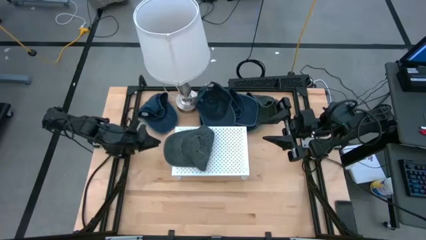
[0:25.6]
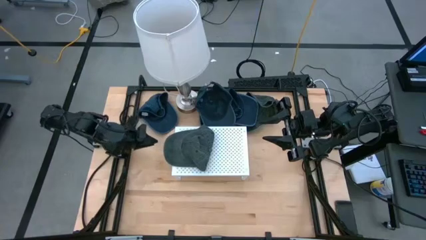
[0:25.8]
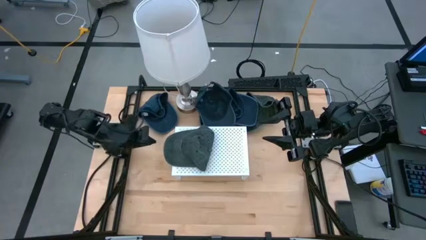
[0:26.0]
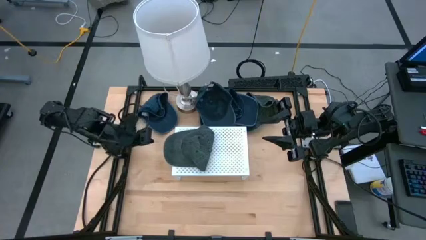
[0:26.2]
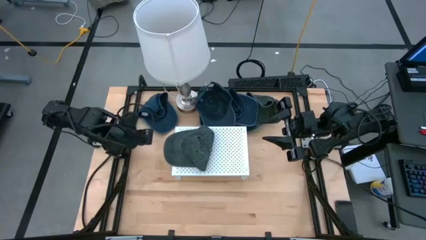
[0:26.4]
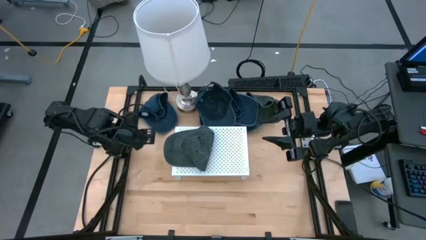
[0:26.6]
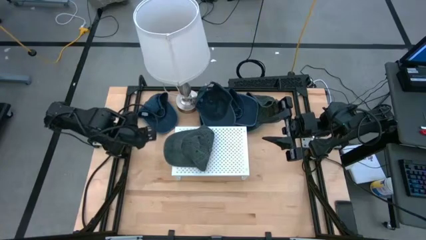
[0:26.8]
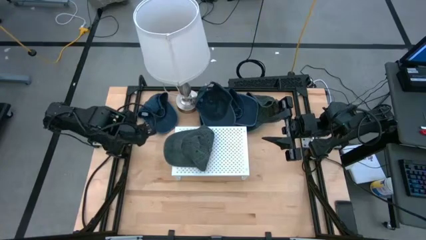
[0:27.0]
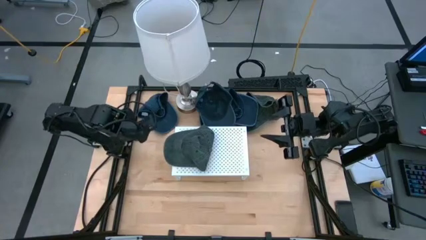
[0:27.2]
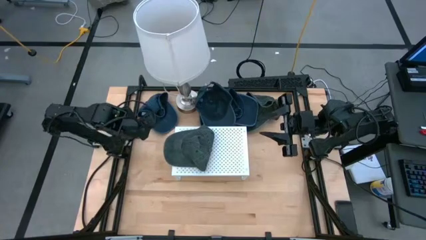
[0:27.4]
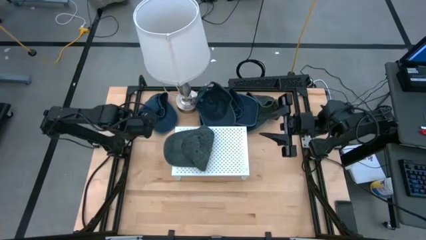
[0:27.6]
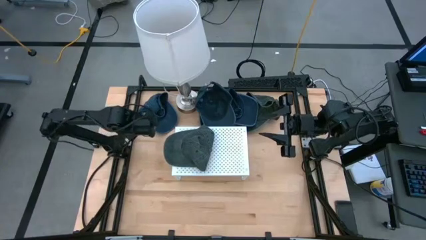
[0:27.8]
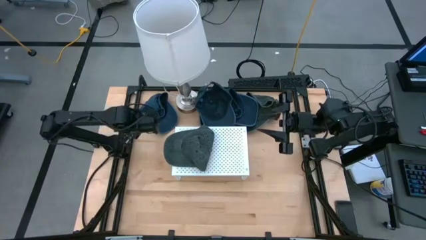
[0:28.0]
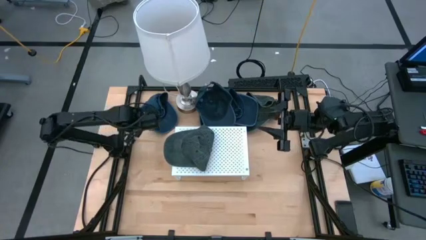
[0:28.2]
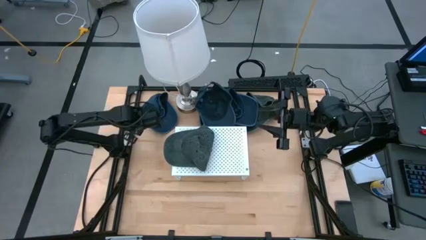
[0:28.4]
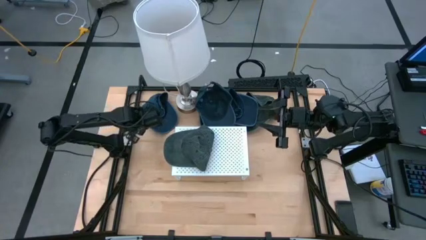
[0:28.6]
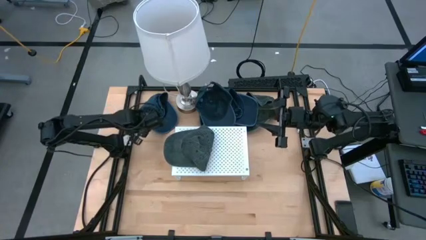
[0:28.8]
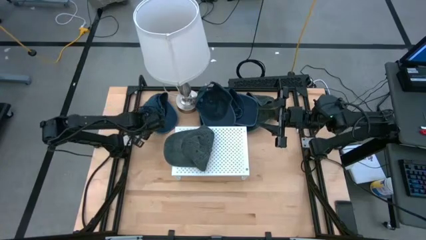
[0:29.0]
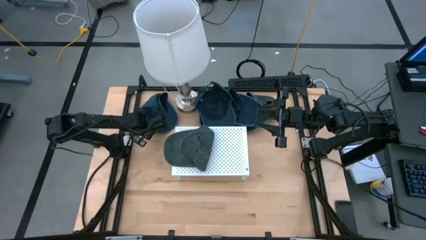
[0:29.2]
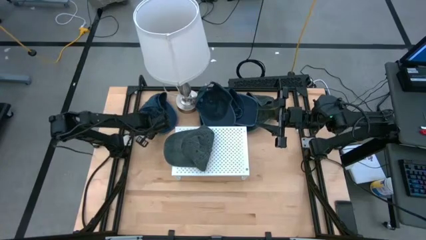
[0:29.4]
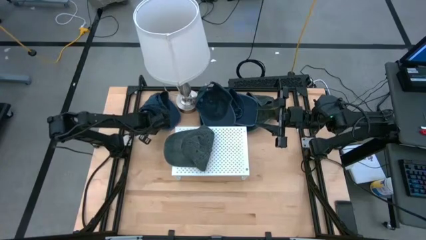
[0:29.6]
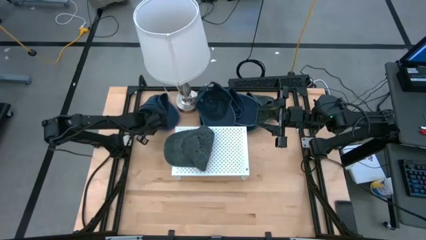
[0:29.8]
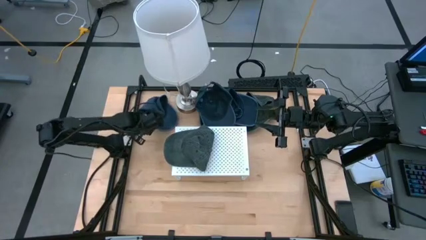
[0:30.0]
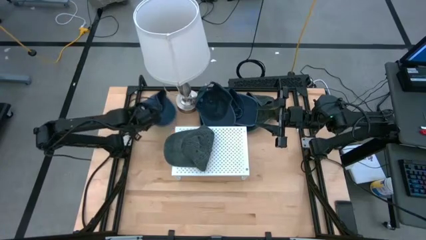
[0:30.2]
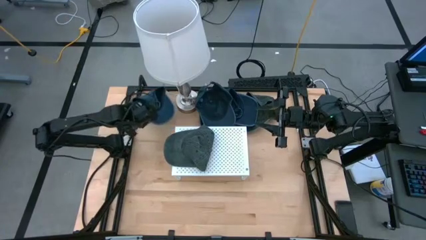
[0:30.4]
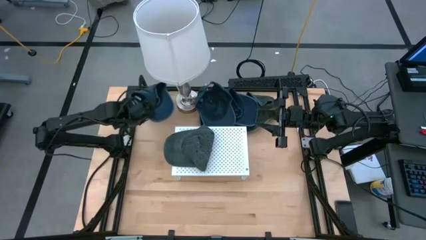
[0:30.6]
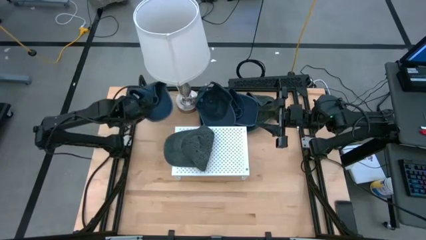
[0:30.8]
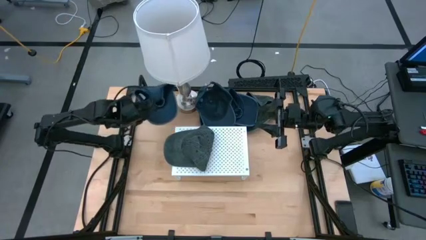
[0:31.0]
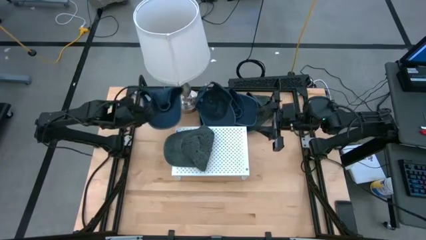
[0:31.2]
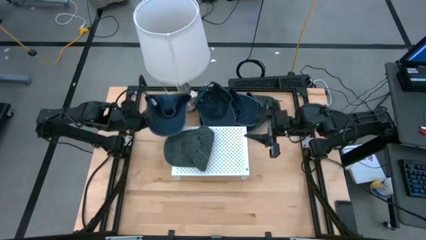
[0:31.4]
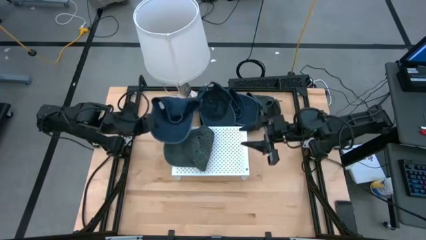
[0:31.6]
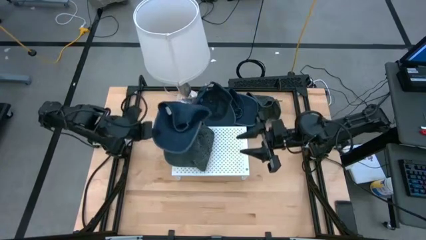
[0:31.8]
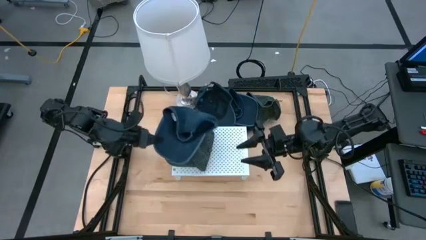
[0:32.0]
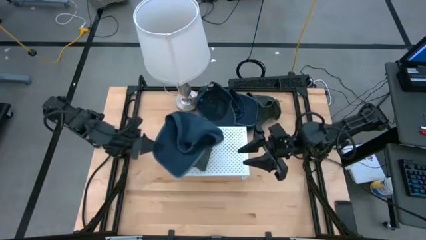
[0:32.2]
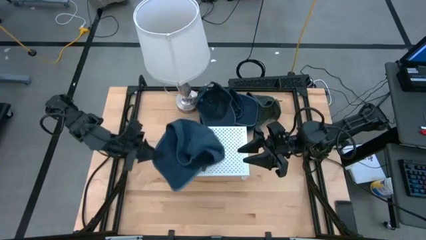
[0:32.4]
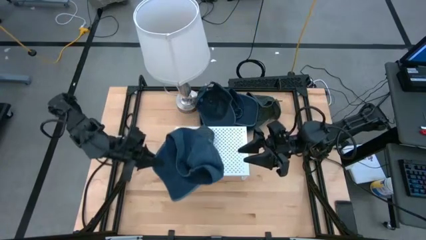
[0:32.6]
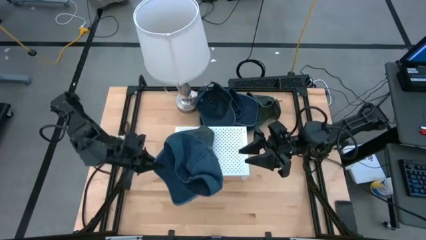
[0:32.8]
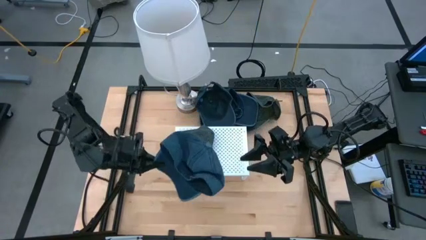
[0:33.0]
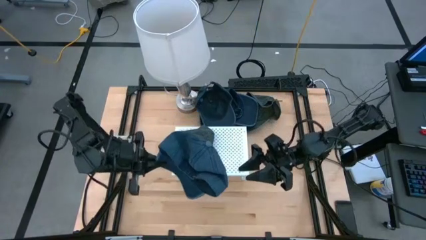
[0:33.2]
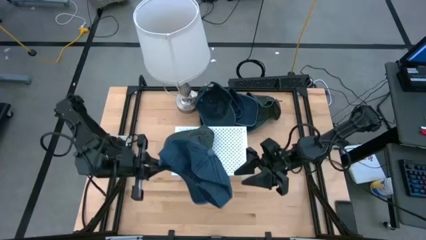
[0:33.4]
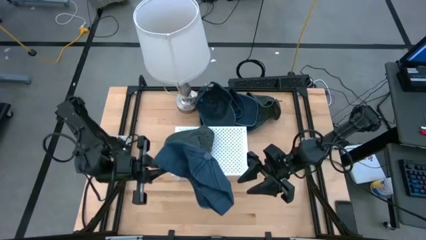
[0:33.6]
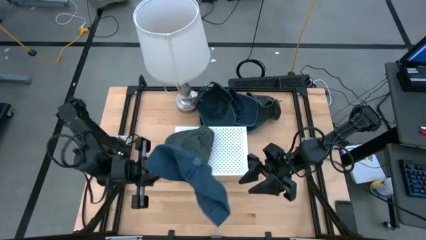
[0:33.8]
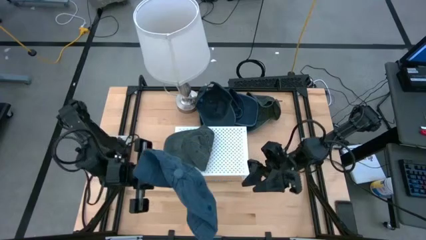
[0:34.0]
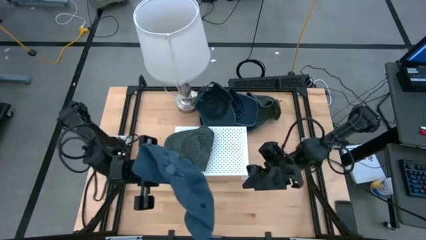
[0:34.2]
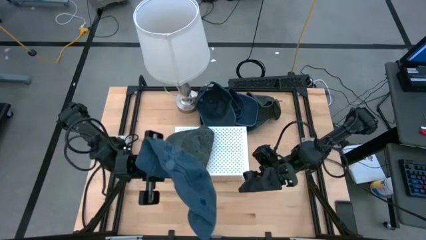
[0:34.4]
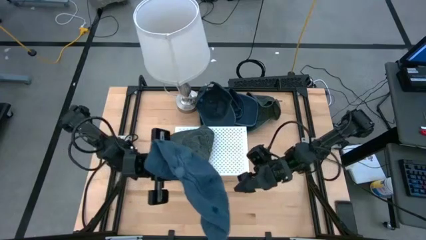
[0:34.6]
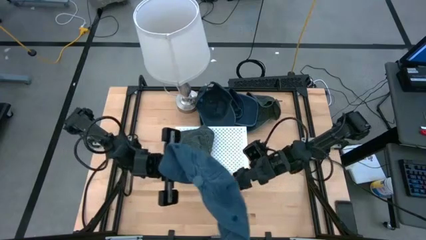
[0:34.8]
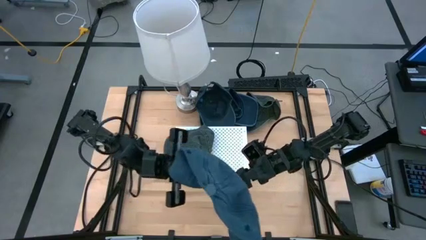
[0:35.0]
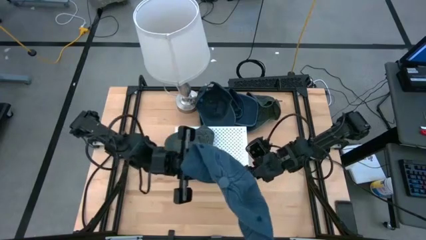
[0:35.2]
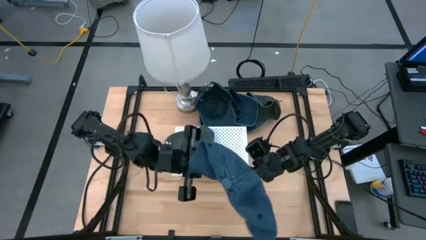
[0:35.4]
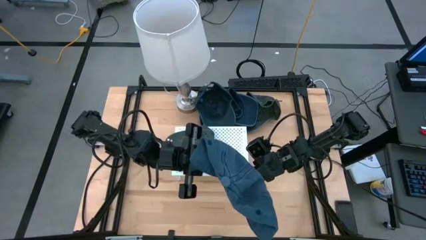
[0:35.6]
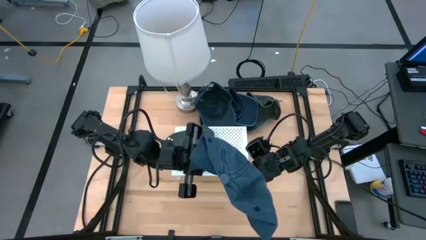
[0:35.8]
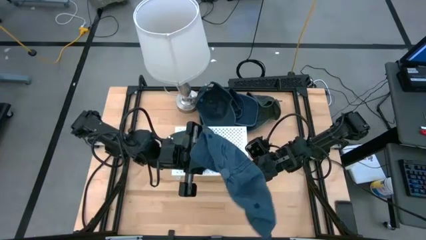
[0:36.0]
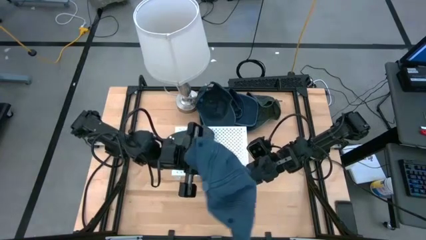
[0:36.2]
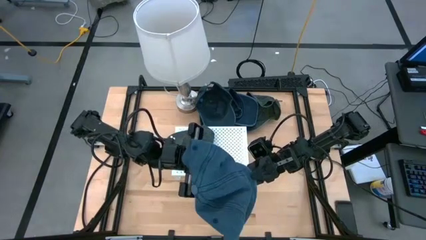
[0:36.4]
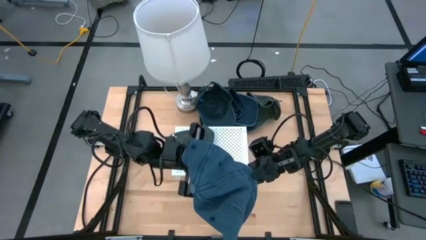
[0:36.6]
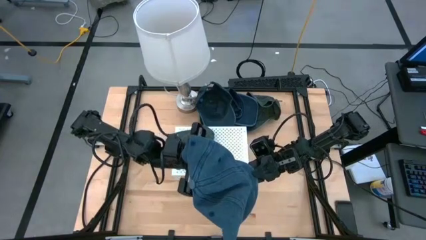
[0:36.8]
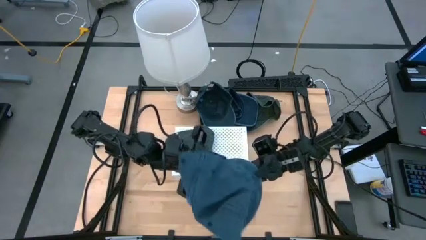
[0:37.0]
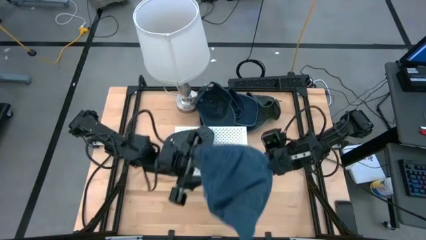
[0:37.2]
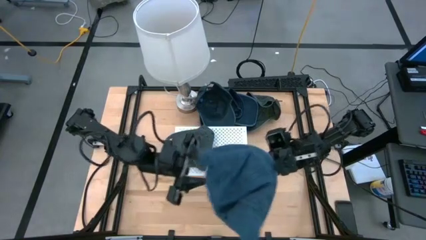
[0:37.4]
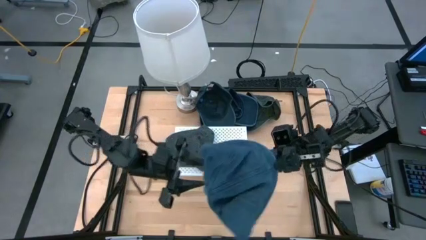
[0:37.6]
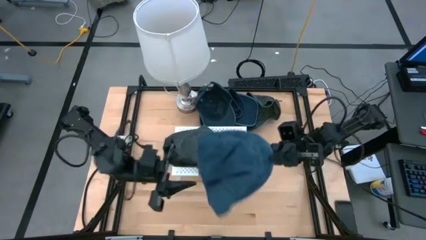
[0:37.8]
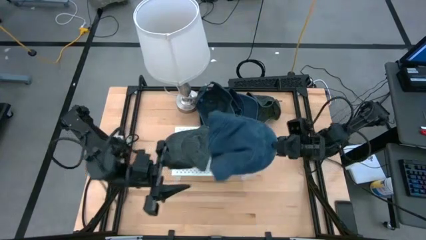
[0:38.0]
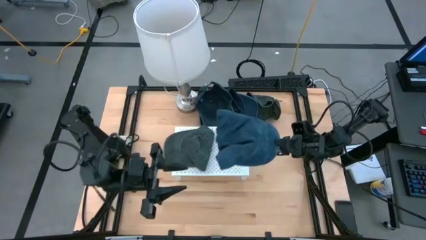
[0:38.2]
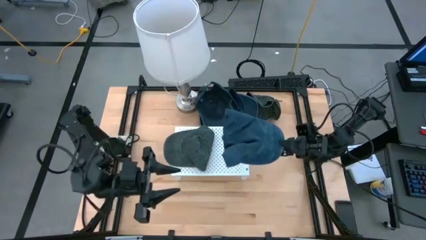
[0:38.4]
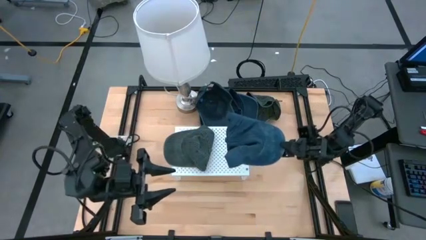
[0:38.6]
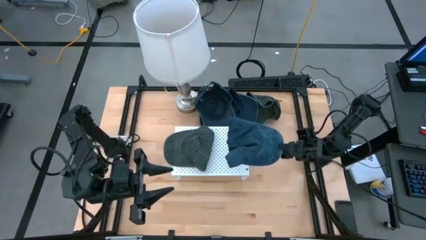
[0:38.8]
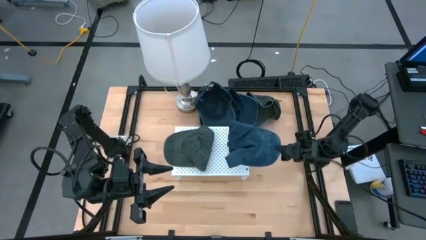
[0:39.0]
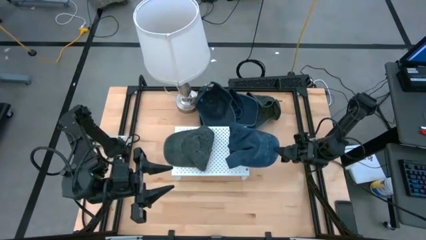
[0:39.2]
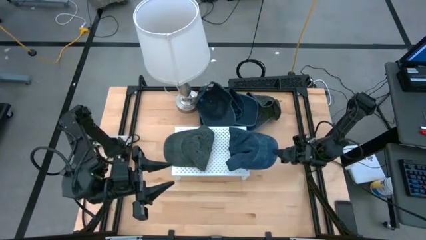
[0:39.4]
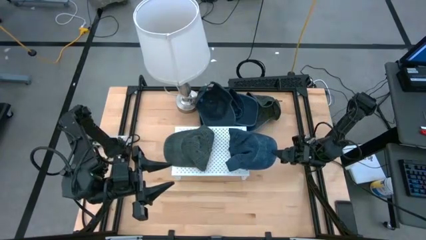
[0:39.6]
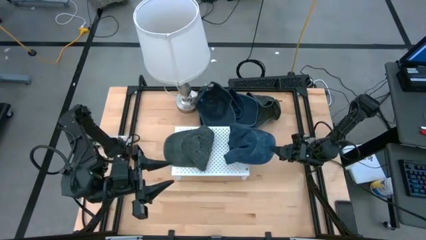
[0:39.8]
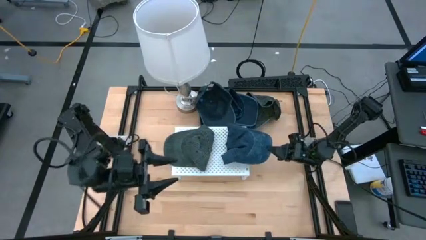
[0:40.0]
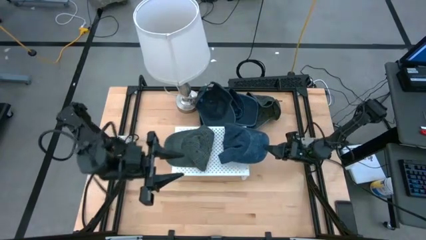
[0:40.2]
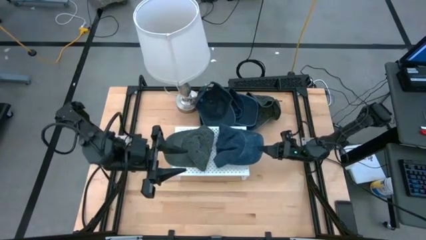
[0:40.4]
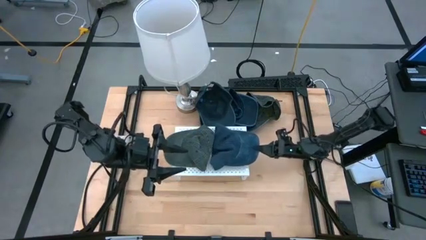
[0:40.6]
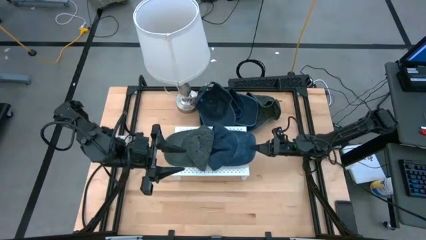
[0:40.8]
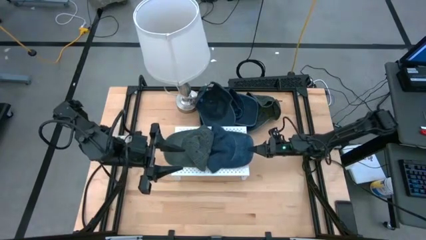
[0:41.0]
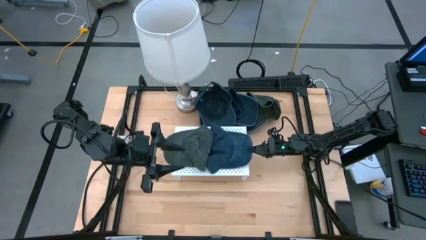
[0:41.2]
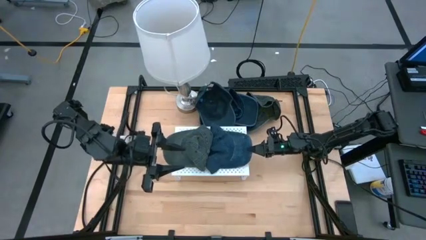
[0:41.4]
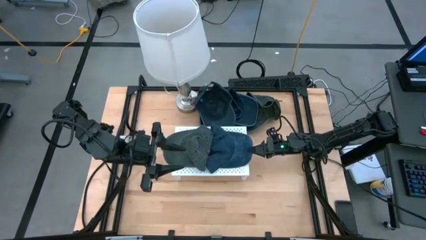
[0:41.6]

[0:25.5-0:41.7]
Task: Pick & Place hat
Put the left blue cap on the right side of the shelf
